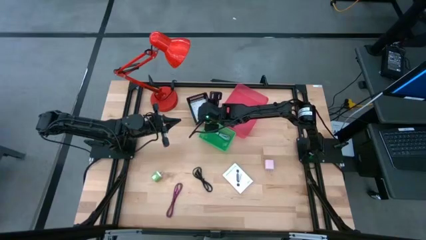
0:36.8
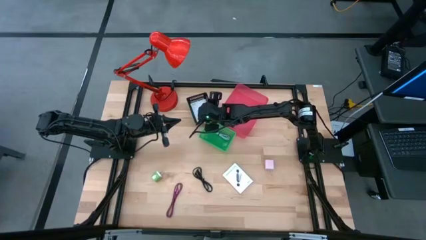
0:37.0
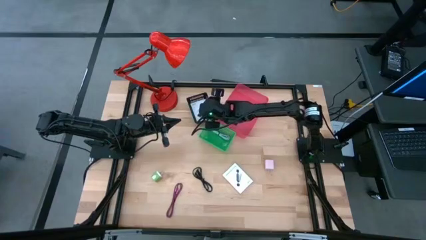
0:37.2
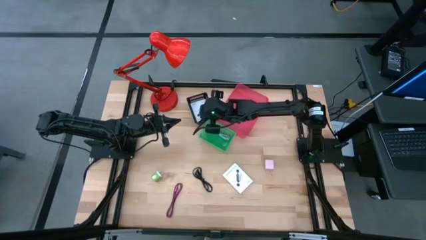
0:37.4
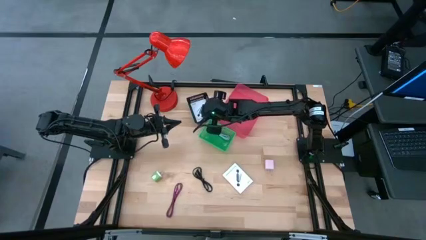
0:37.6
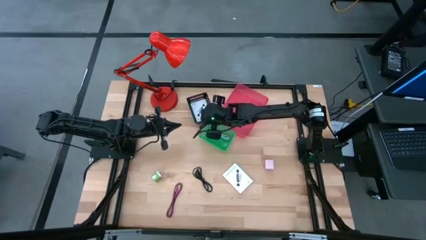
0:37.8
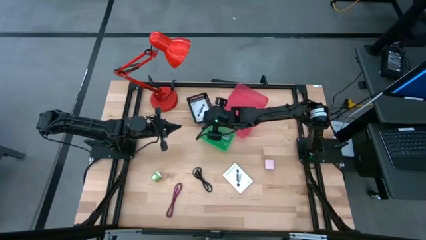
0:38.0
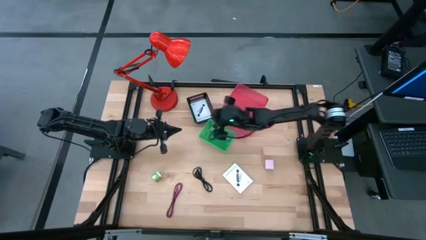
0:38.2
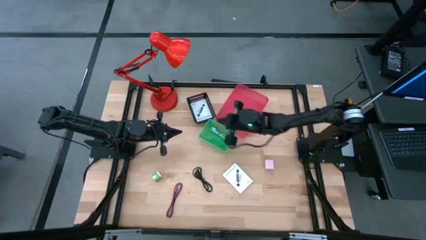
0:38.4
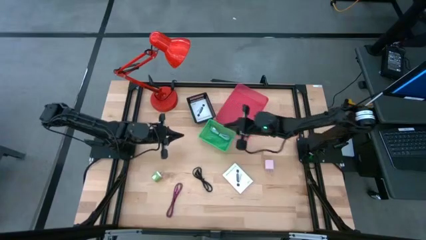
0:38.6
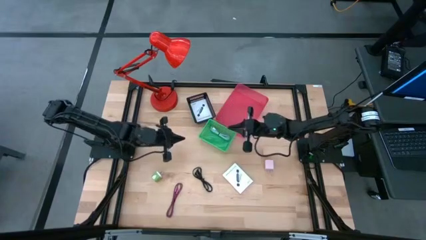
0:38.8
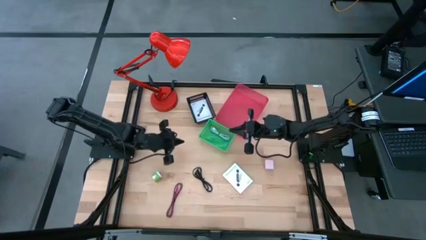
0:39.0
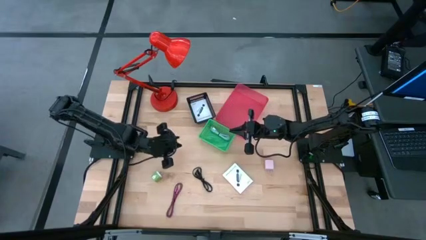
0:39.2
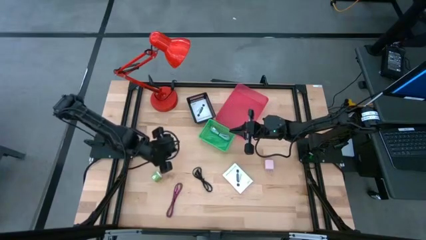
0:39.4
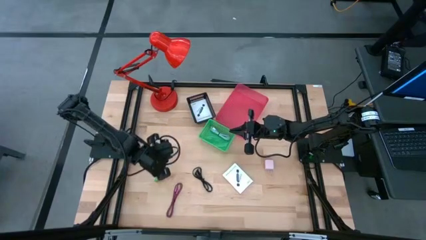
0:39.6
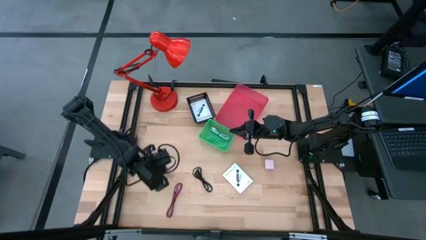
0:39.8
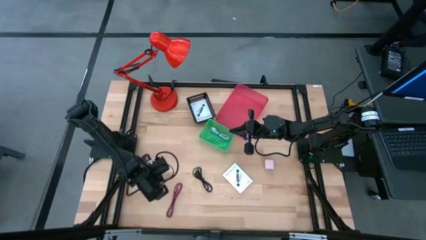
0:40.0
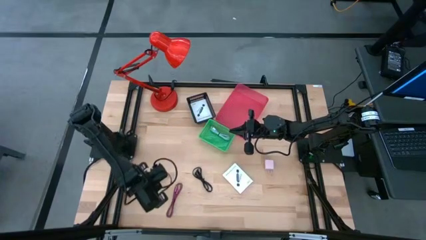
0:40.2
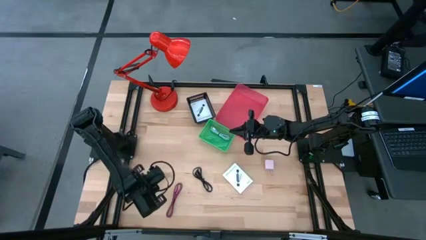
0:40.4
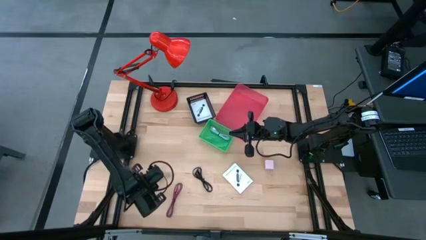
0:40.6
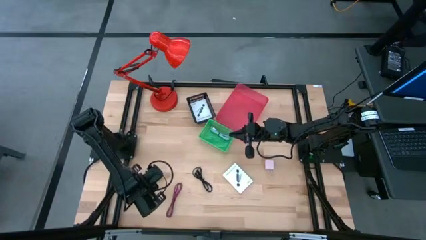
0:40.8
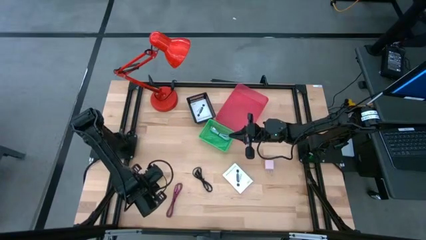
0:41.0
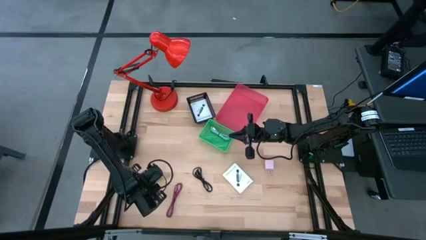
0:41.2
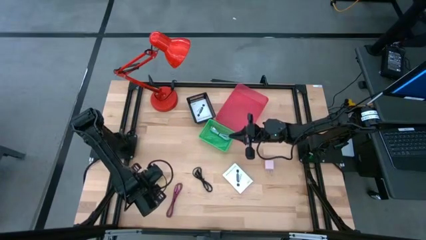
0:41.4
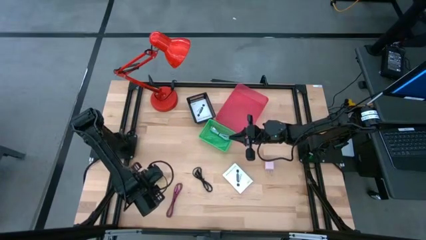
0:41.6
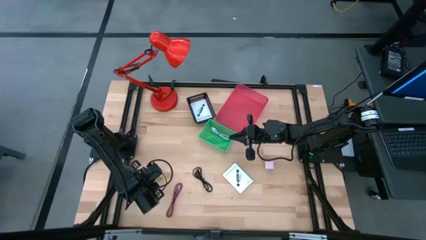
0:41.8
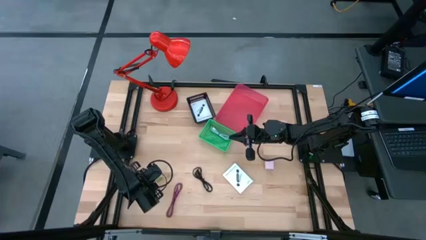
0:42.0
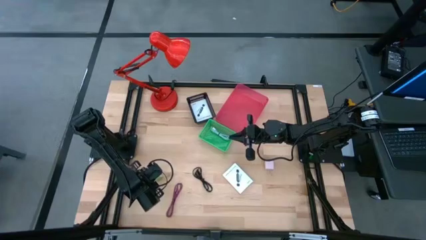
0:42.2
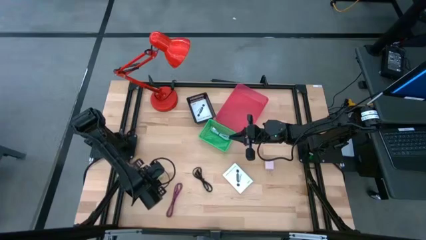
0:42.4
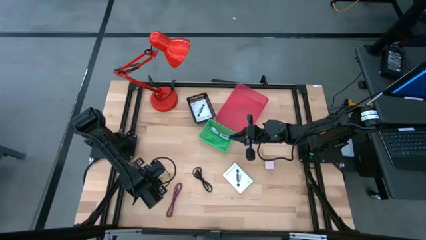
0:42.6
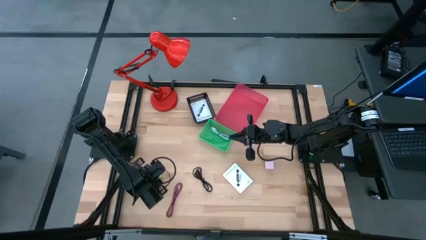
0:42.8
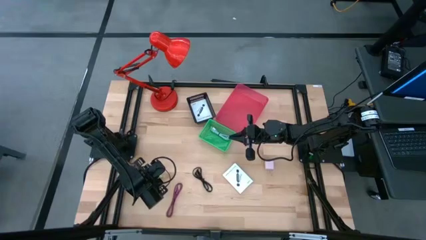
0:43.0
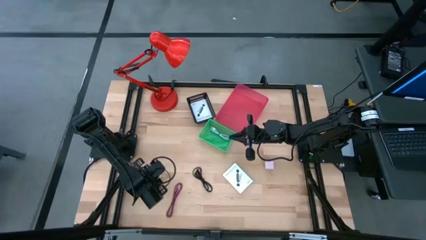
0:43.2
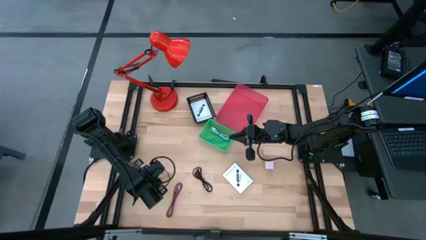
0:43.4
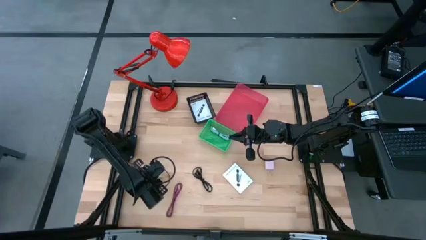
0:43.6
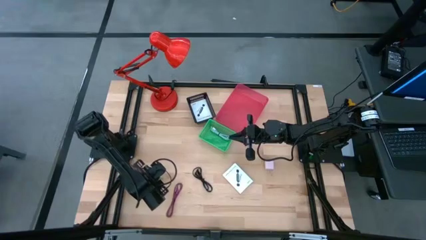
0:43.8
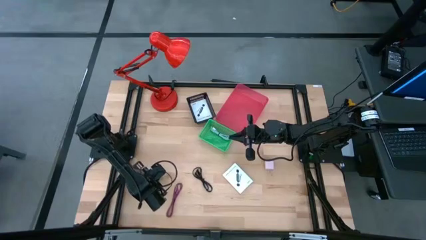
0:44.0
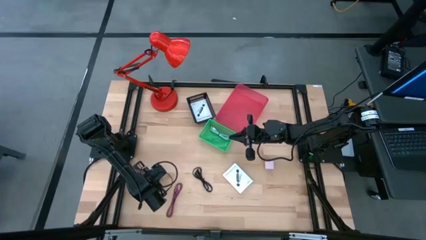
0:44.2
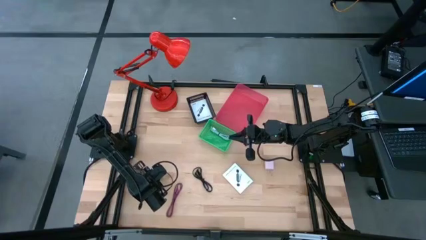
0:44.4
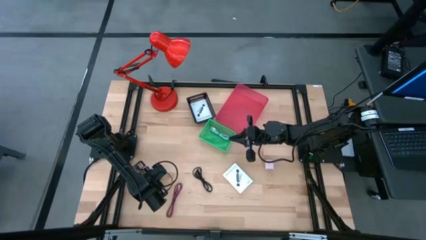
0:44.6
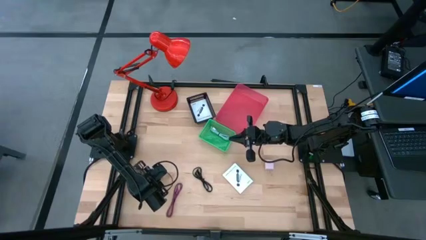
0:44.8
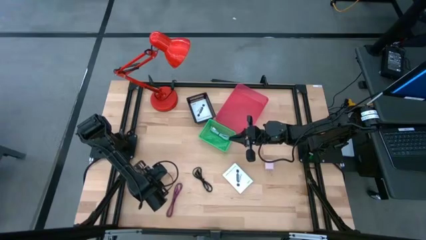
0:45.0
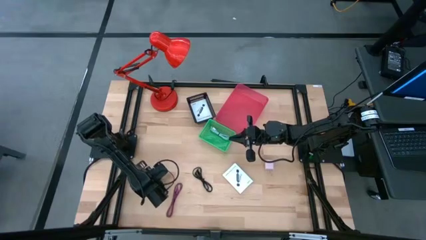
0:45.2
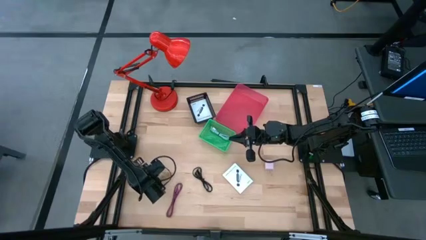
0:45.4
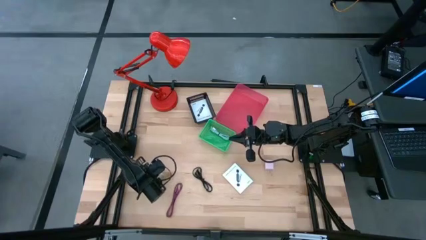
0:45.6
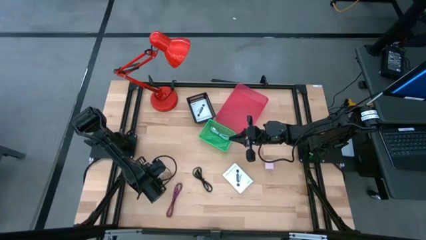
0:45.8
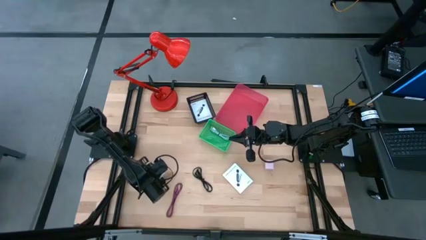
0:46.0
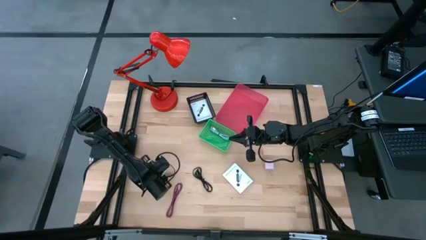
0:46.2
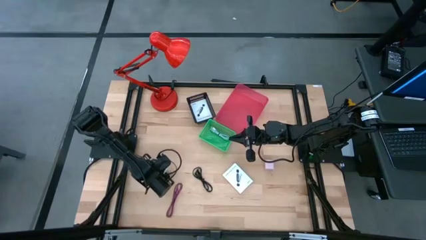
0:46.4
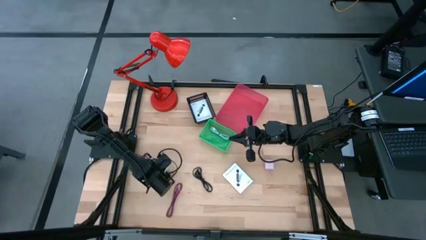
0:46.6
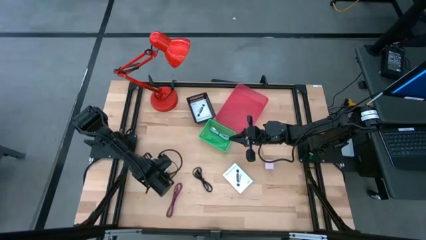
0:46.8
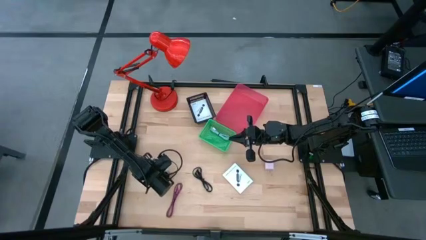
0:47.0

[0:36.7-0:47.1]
Task: Pick and place items into bin
Put the green charger adapter into the red bin
